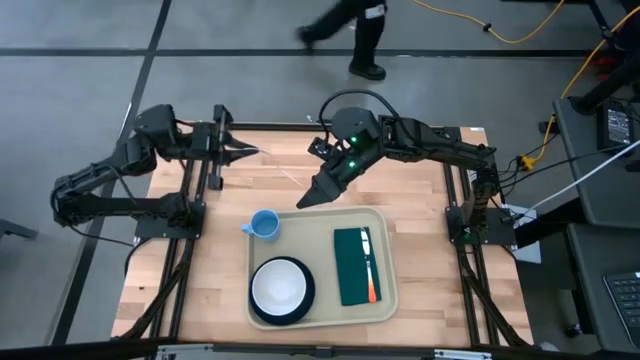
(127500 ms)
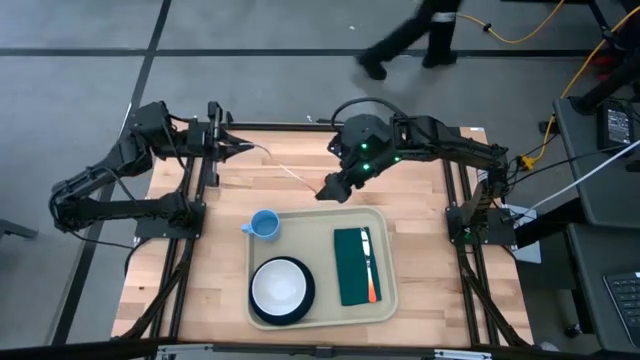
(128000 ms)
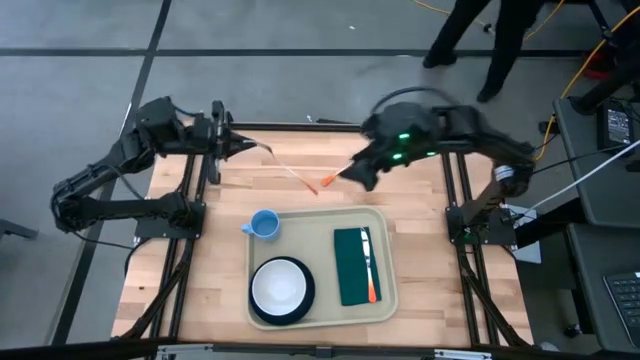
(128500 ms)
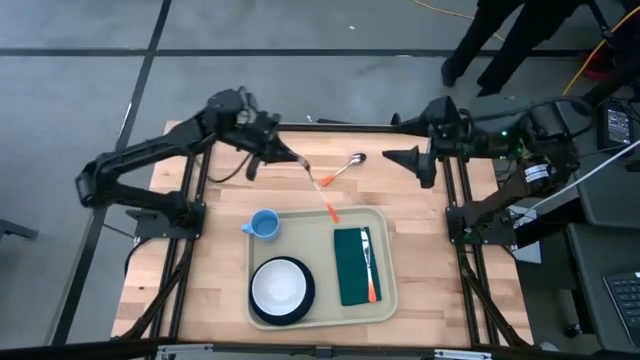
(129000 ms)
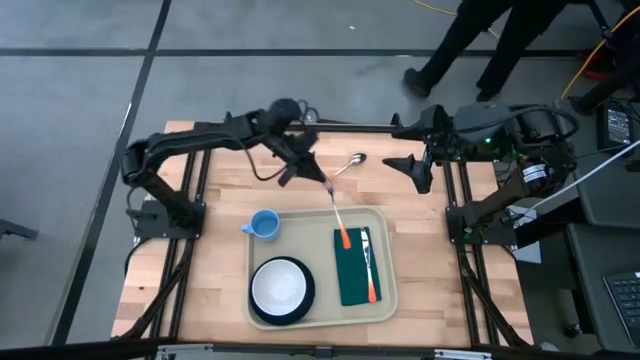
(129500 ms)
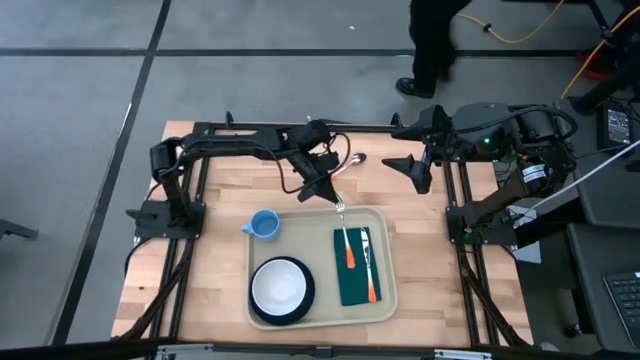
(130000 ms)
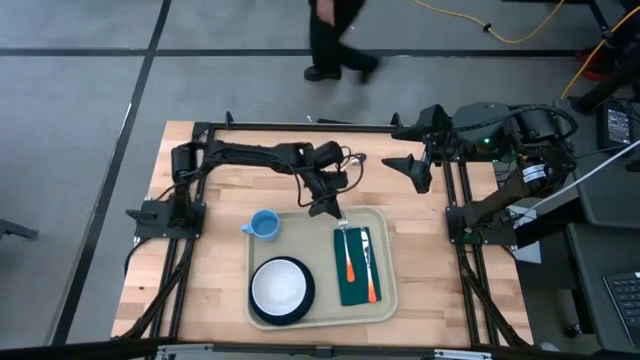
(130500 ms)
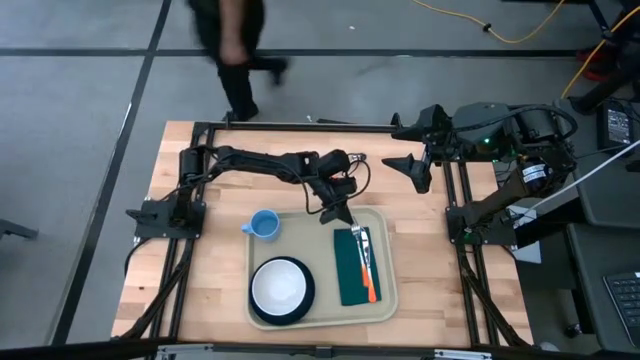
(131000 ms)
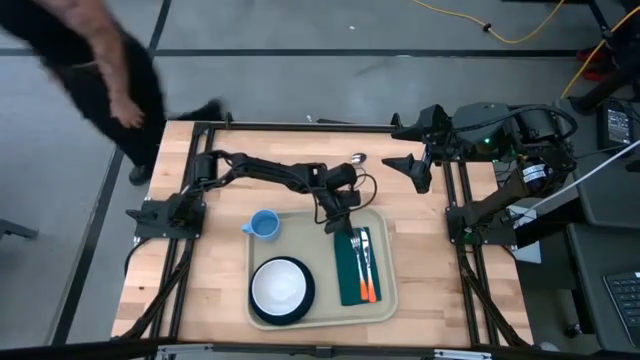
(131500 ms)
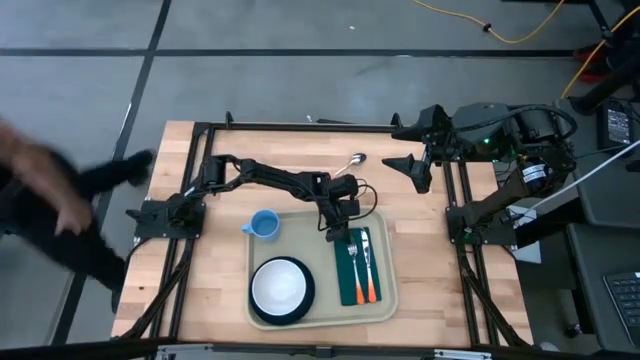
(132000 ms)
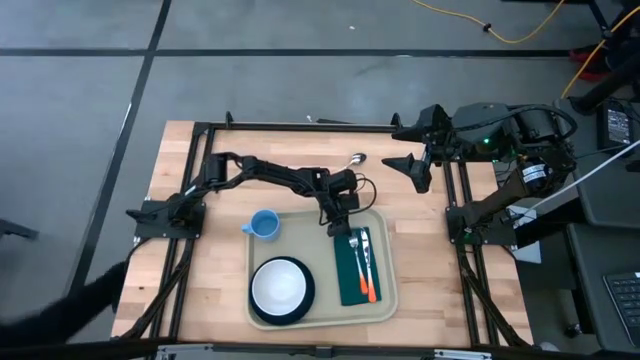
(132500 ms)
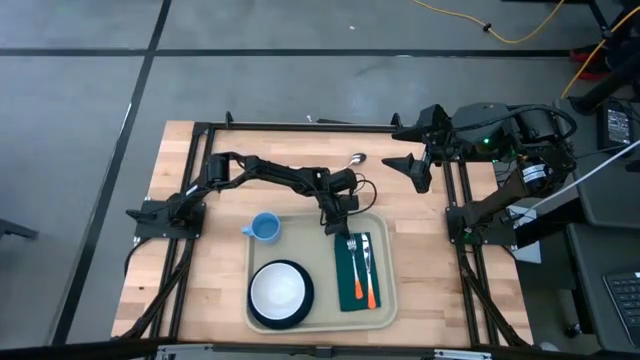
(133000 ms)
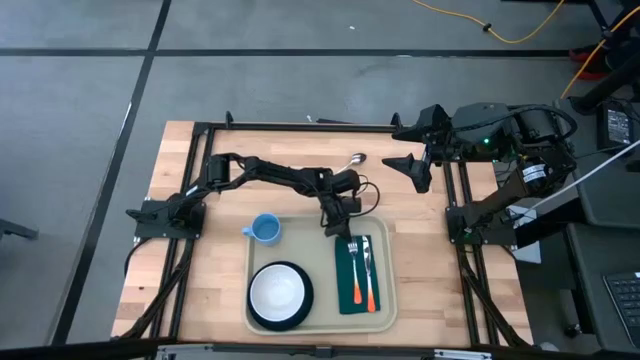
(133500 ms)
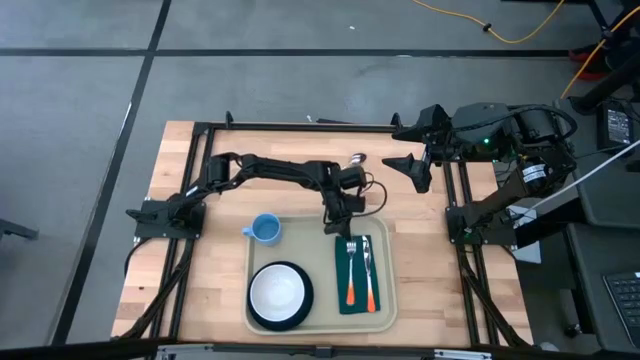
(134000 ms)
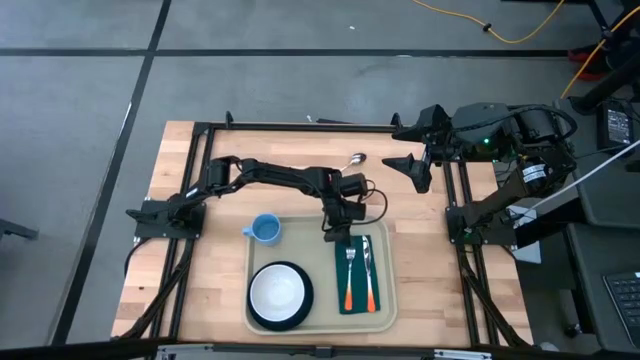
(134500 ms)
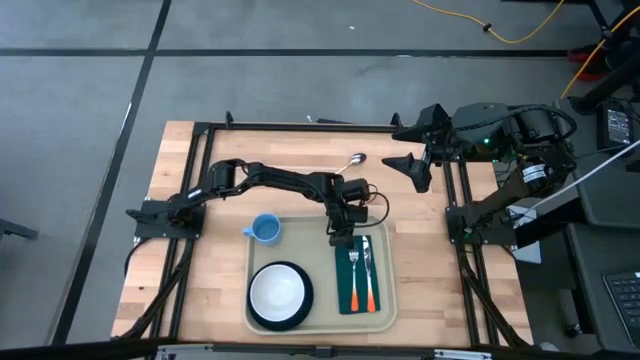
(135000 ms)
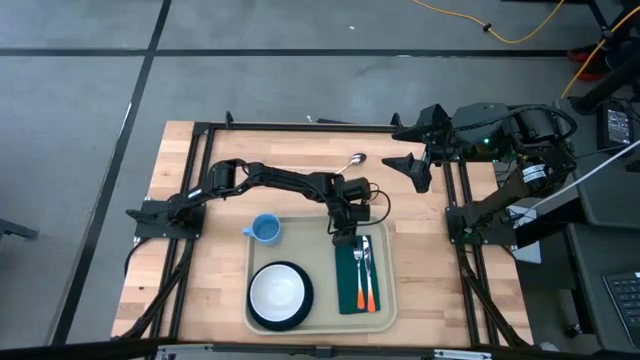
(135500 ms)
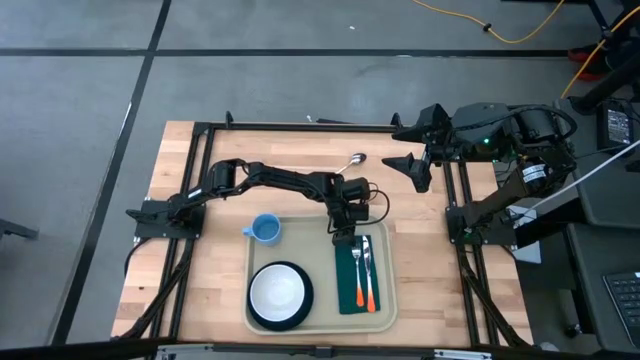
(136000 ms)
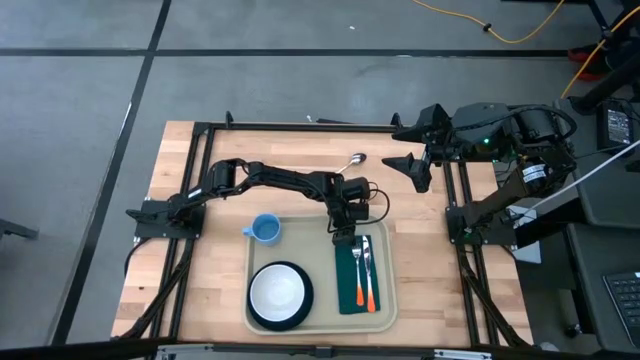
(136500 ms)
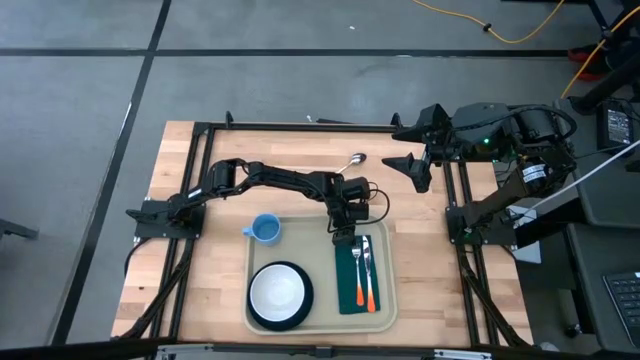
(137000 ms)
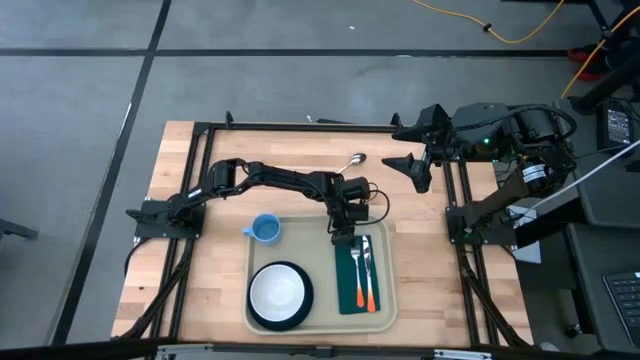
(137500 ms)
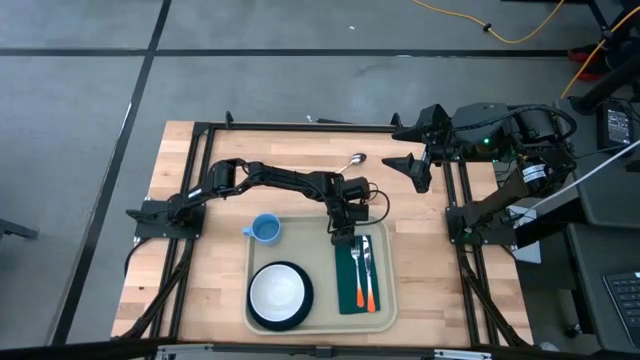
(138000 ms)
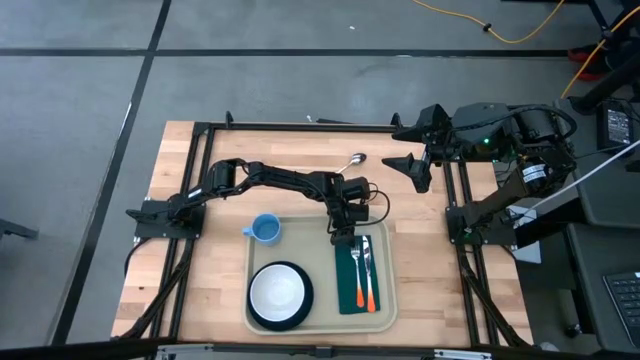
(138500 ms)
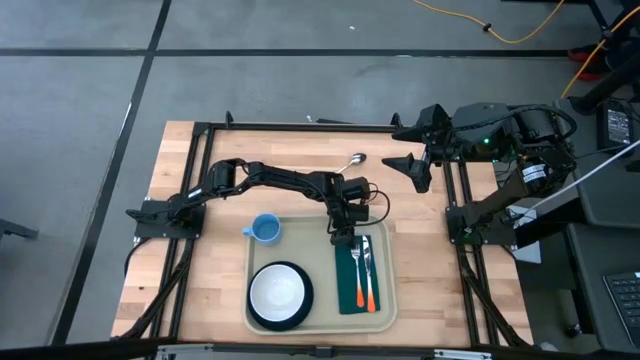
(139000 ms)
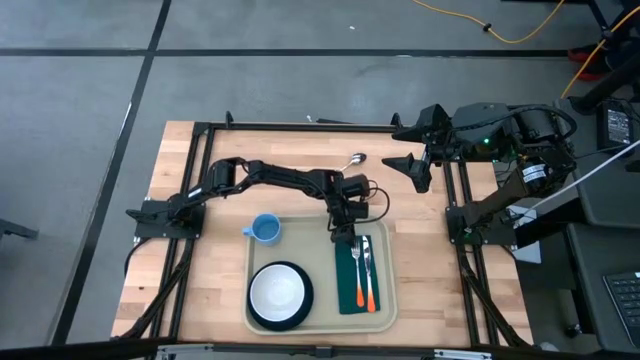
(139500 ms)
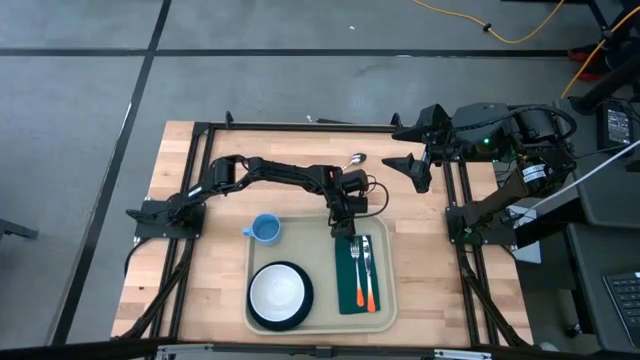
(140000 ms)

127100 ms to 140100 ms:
Task: Set up tray
Put the orange fork on top of the green napkin to the left of the orange knife

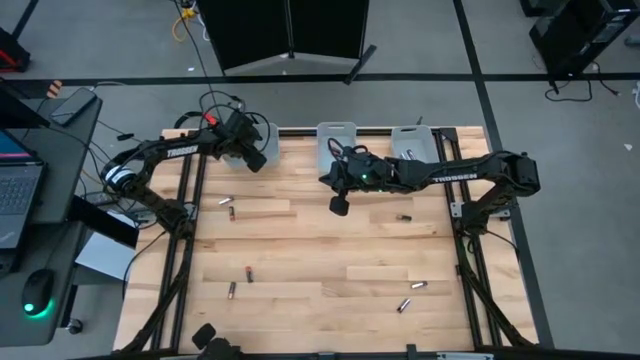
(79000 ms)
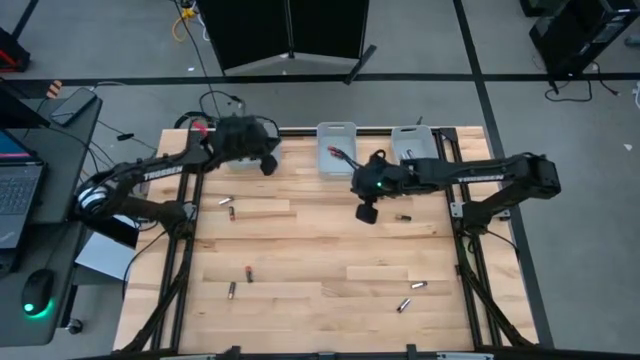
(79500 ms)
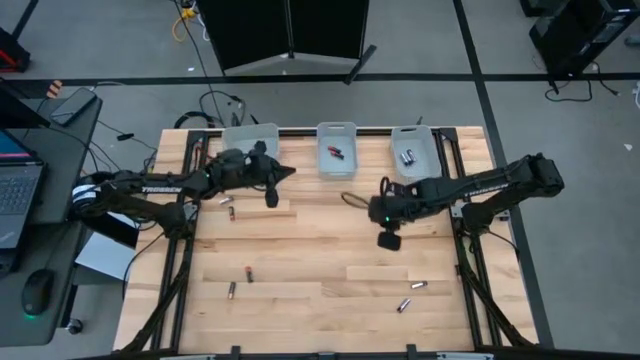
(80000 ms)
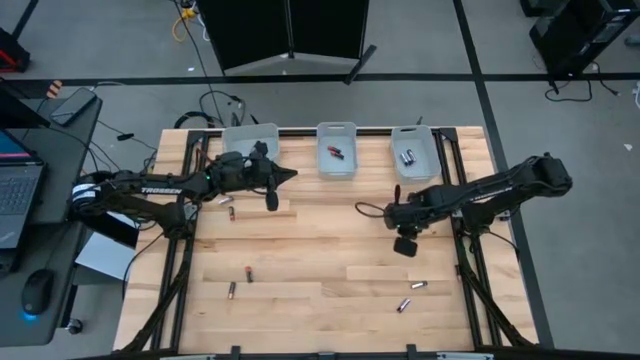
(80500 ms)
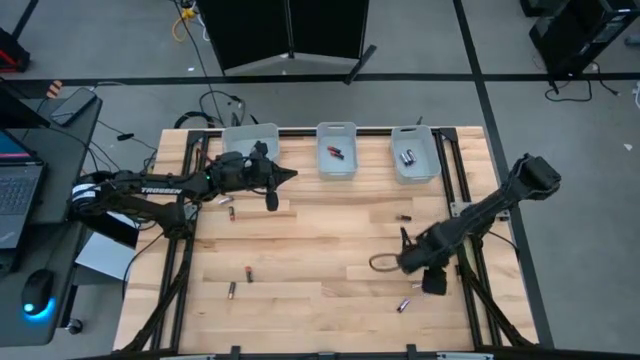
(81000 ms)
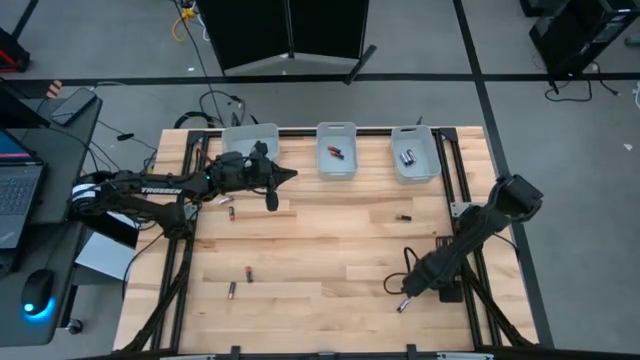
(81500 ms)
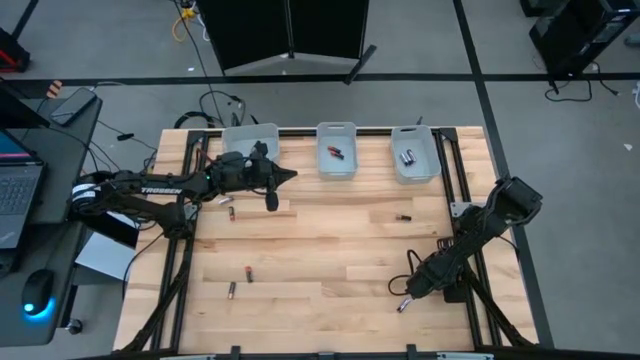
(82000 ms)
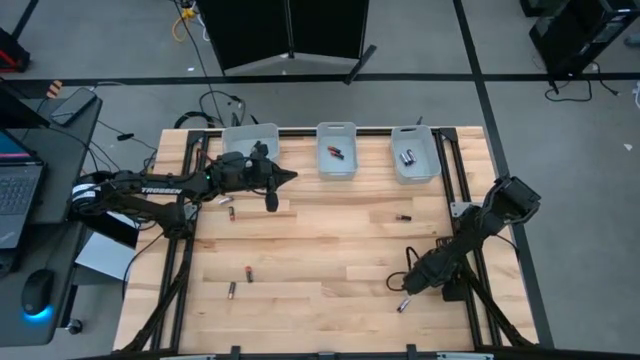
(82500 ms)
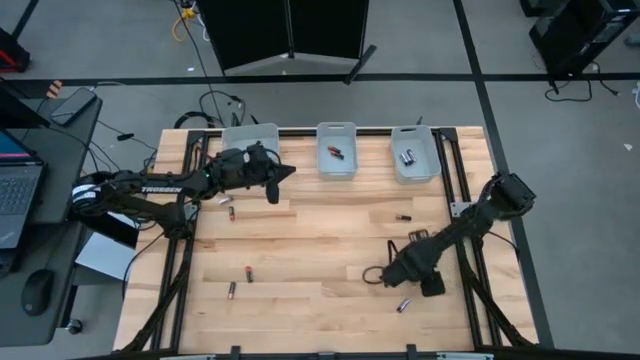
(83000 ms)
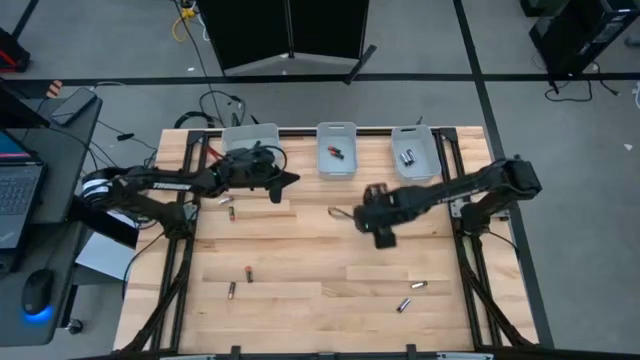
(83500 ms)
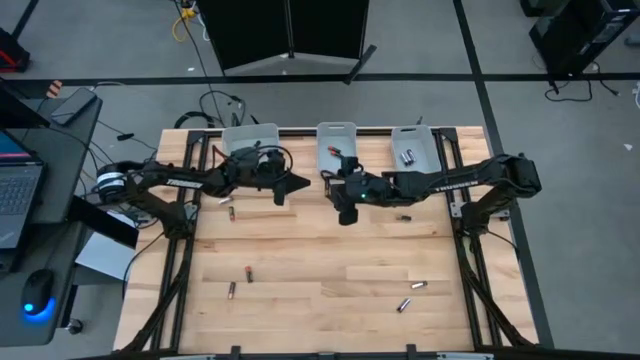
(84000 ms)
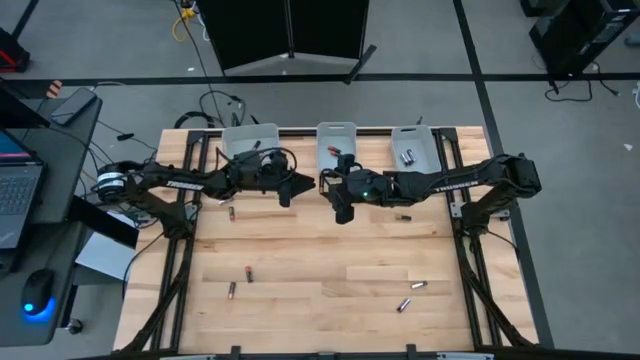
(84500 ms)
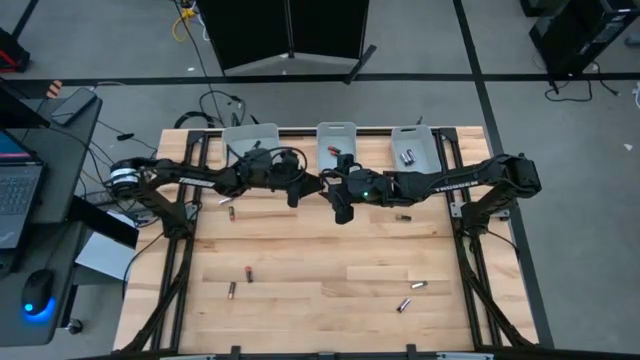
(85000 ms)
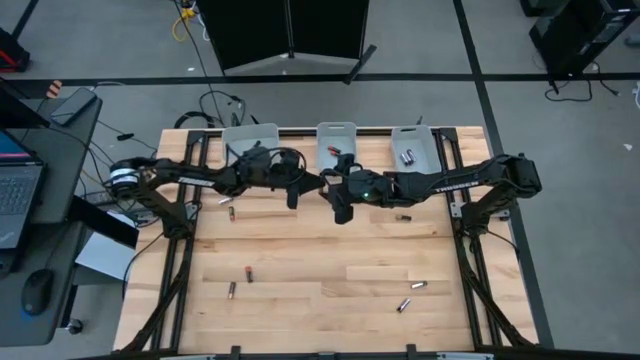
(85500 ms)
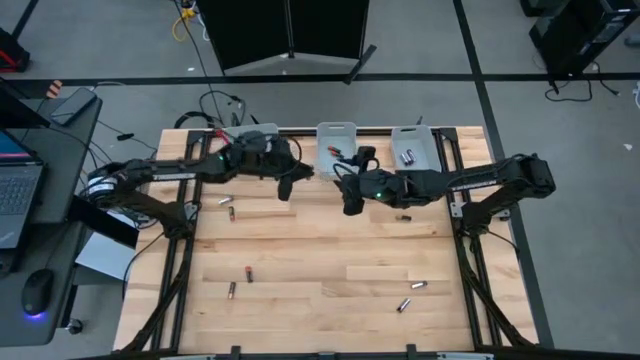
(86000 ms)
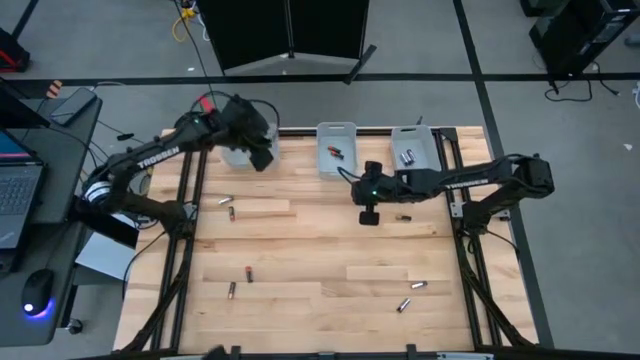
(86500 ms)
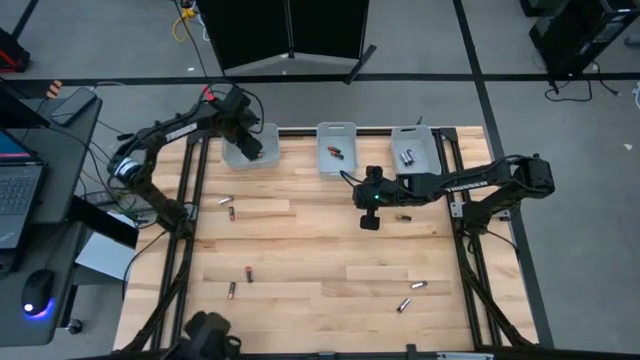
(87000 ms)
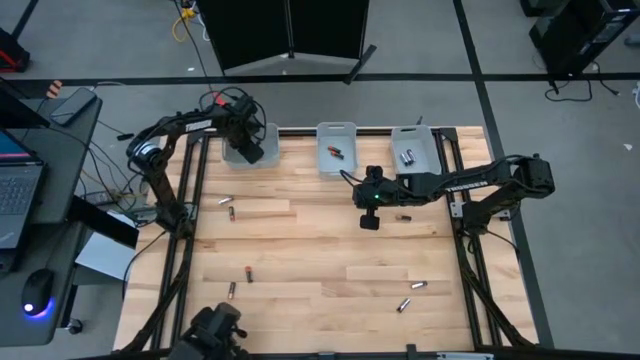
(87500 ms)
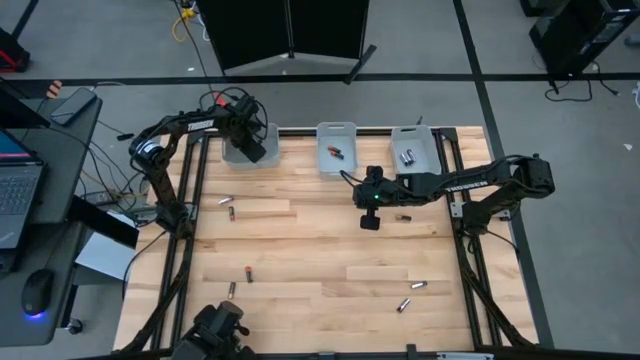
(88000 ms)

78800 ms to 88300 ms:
Task: Sort batteries
Put the bottom right black brown battery into the left bin
